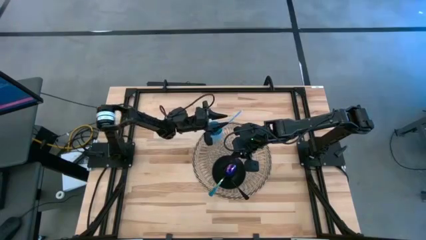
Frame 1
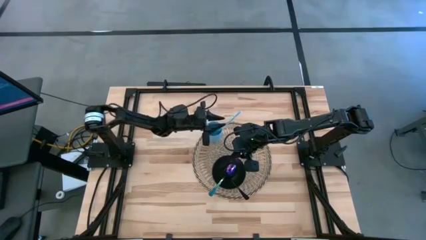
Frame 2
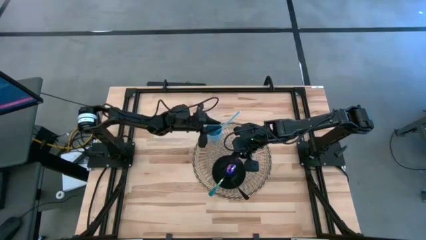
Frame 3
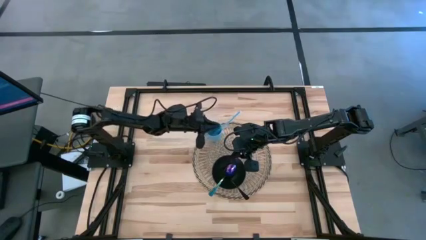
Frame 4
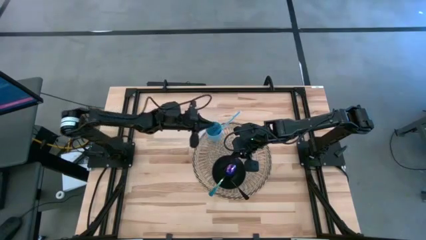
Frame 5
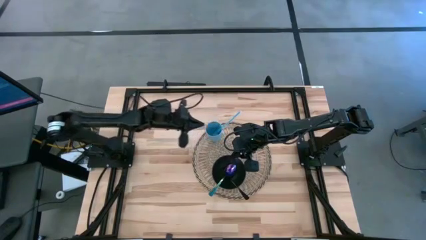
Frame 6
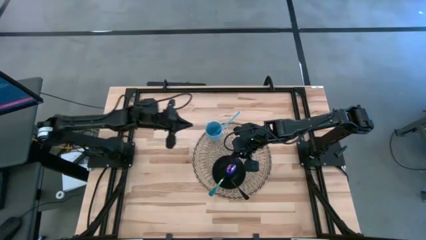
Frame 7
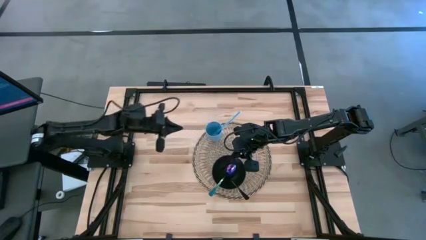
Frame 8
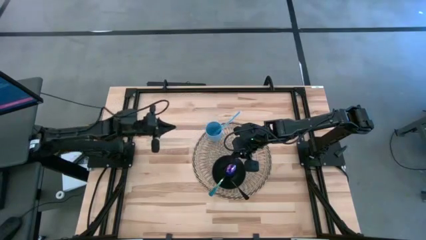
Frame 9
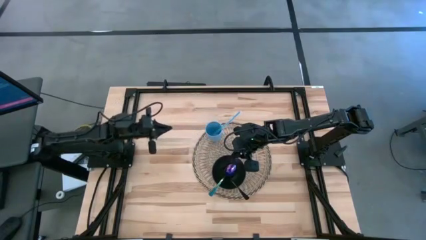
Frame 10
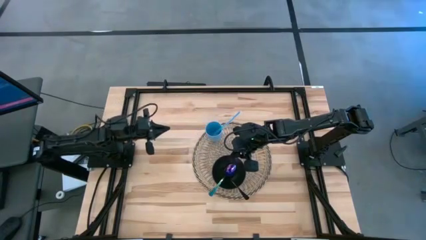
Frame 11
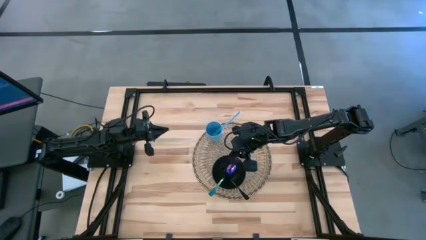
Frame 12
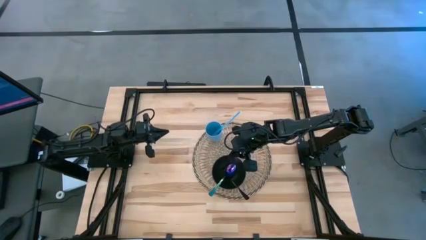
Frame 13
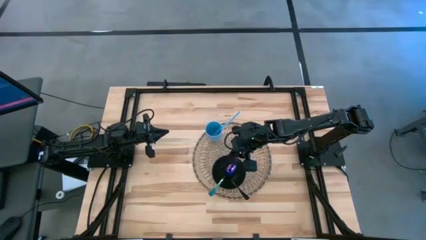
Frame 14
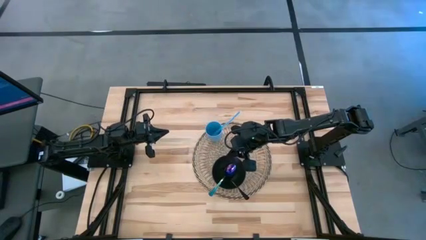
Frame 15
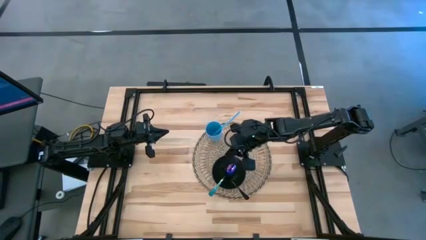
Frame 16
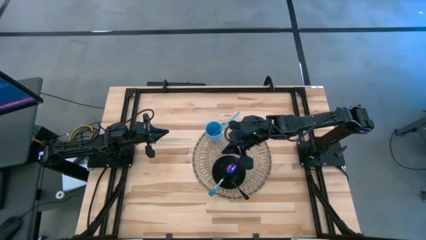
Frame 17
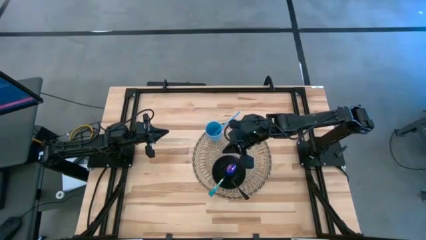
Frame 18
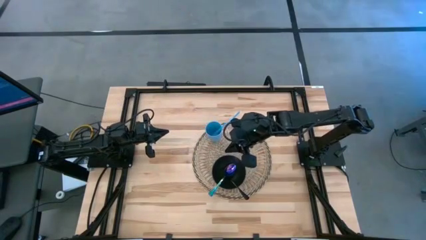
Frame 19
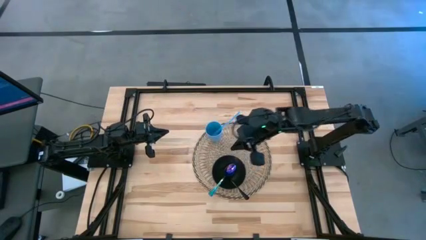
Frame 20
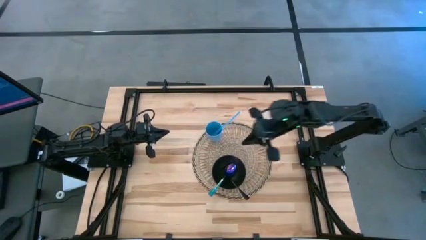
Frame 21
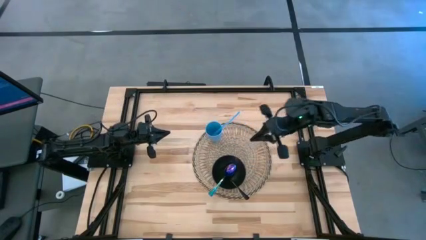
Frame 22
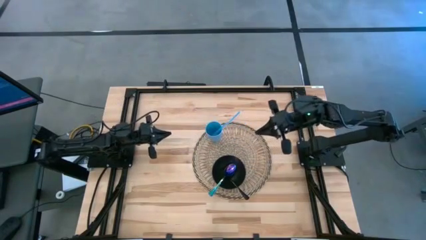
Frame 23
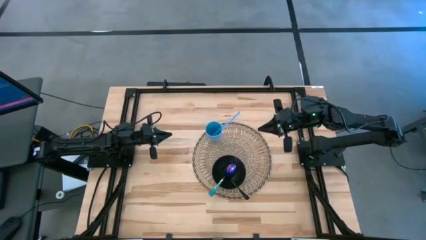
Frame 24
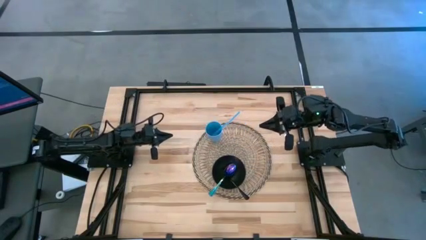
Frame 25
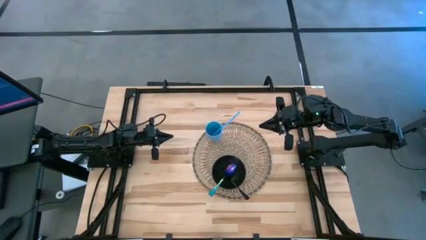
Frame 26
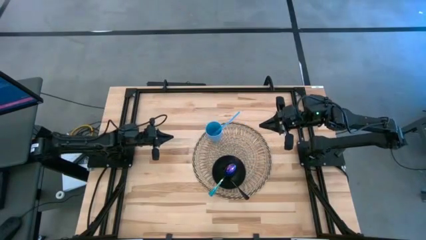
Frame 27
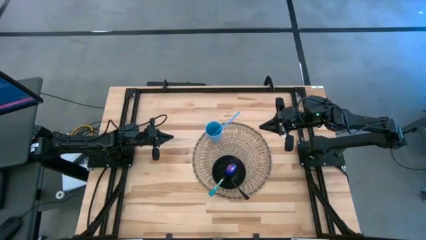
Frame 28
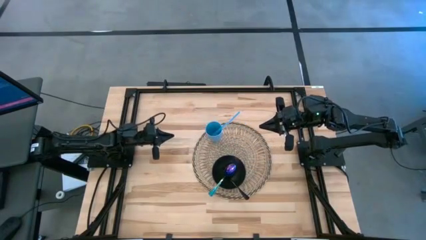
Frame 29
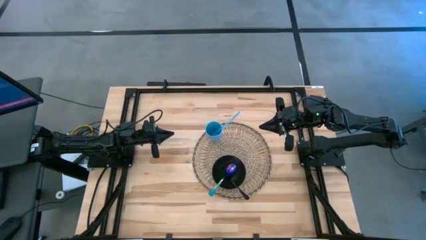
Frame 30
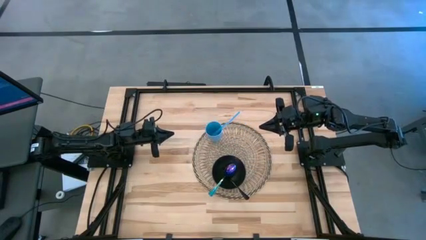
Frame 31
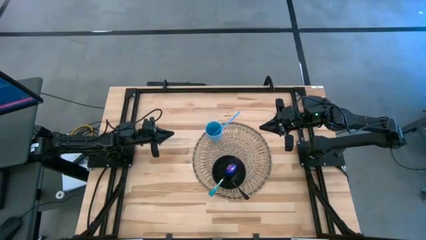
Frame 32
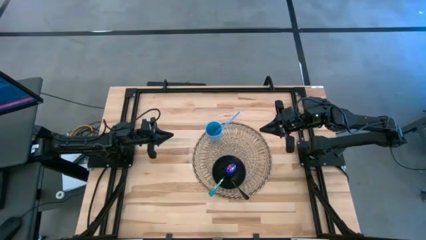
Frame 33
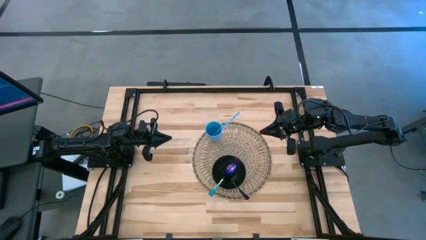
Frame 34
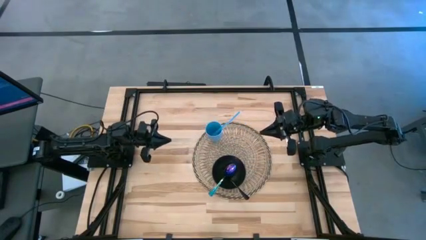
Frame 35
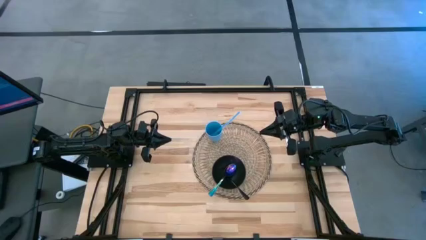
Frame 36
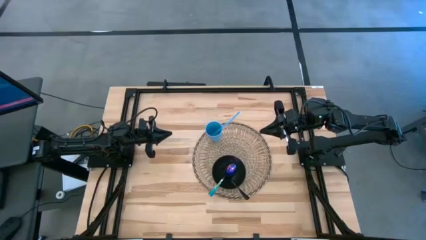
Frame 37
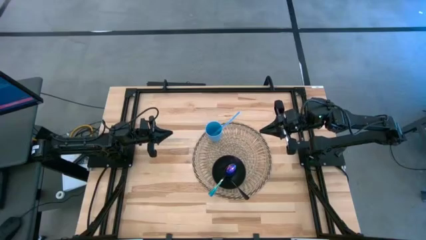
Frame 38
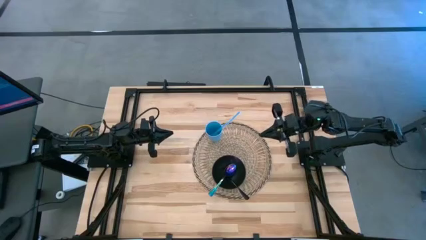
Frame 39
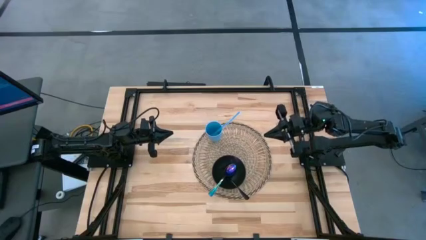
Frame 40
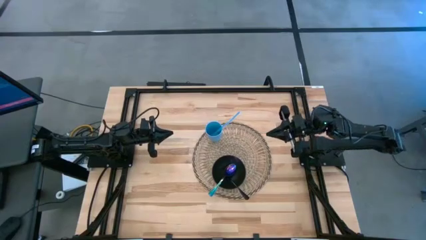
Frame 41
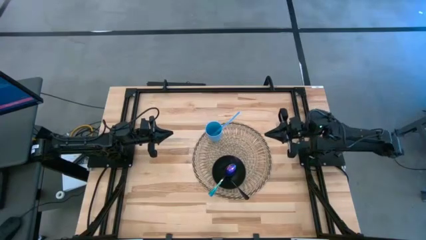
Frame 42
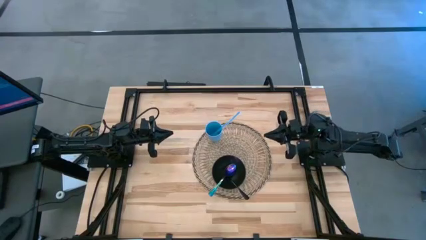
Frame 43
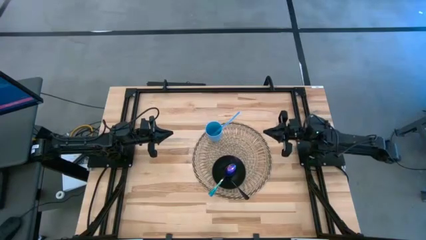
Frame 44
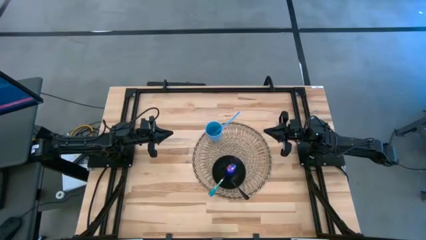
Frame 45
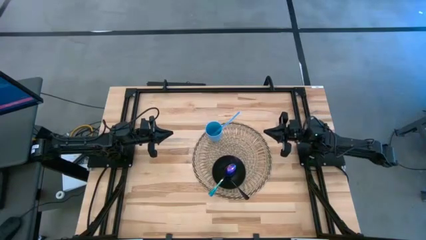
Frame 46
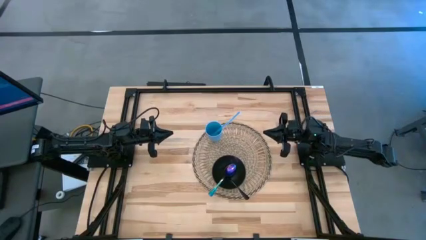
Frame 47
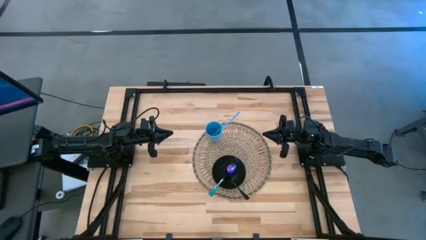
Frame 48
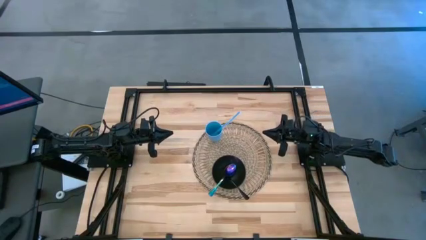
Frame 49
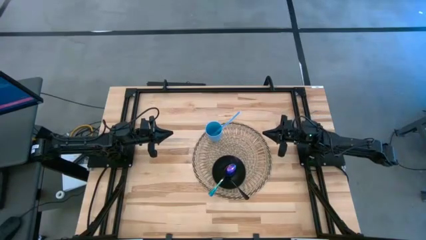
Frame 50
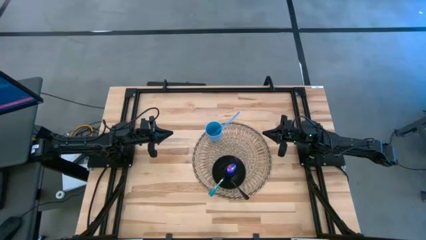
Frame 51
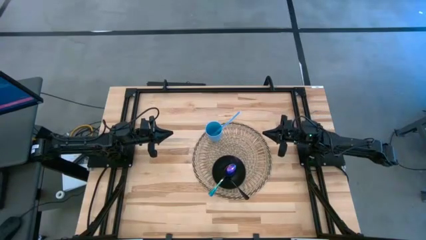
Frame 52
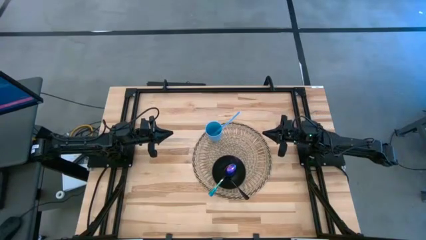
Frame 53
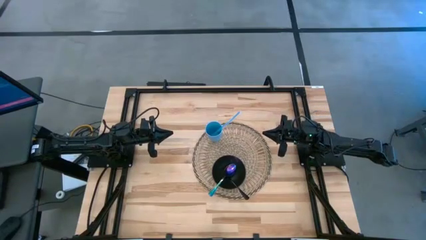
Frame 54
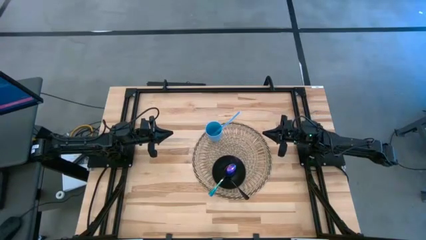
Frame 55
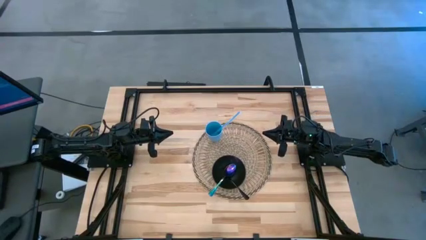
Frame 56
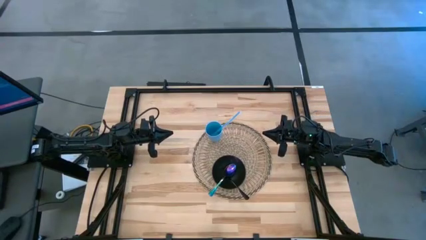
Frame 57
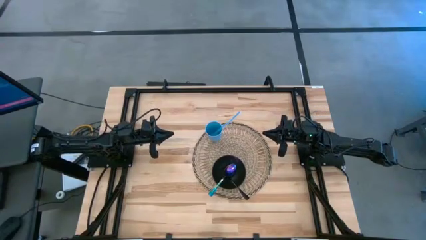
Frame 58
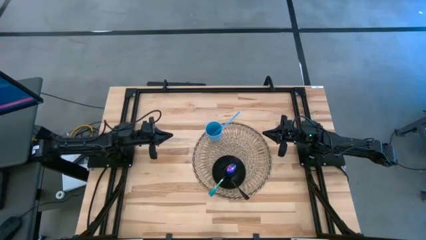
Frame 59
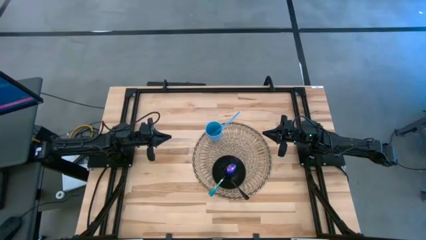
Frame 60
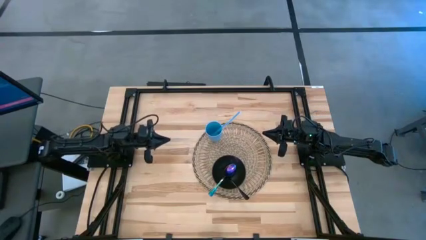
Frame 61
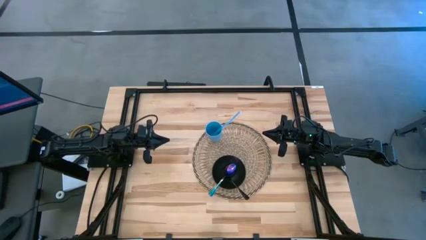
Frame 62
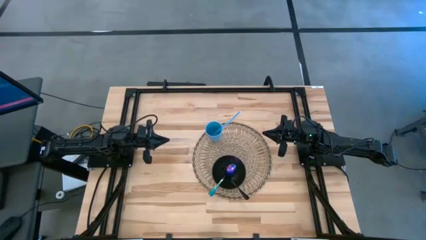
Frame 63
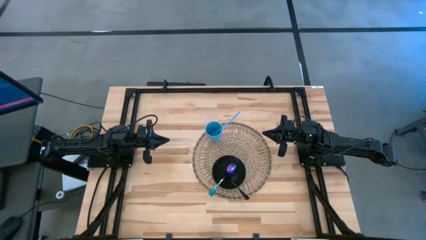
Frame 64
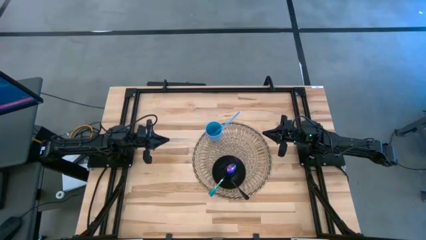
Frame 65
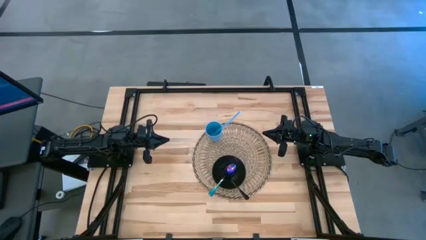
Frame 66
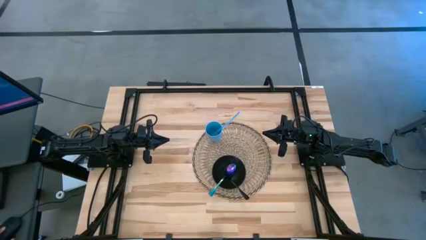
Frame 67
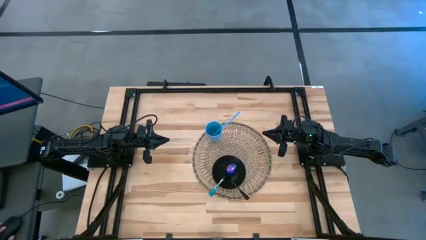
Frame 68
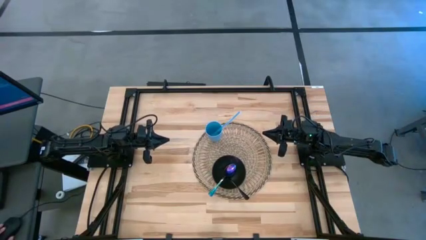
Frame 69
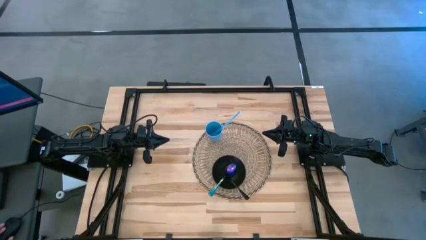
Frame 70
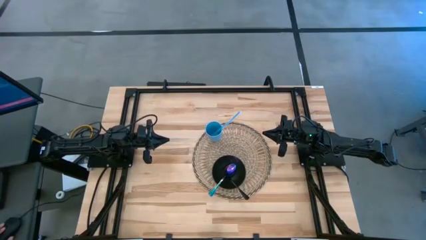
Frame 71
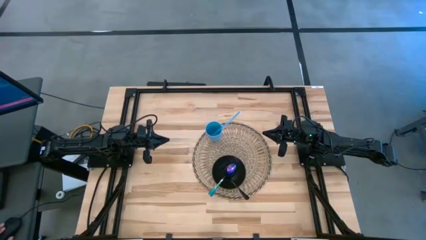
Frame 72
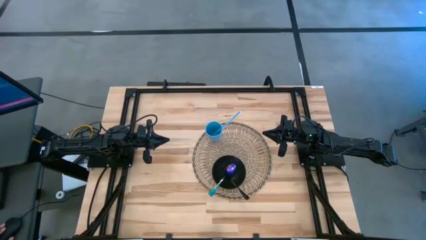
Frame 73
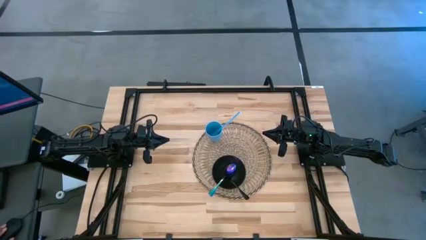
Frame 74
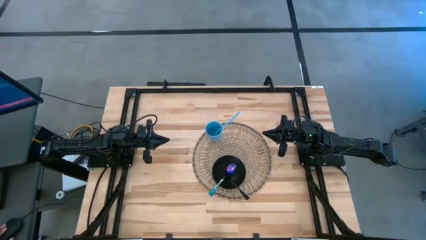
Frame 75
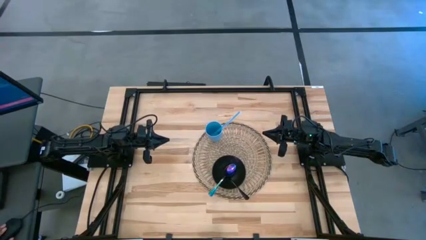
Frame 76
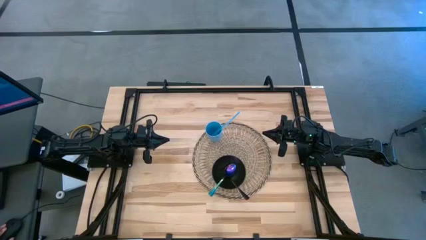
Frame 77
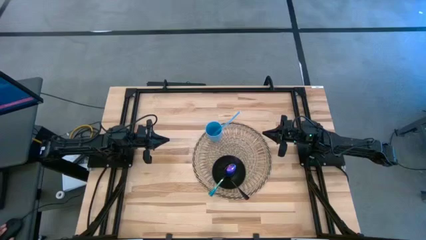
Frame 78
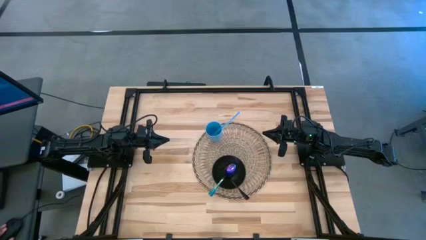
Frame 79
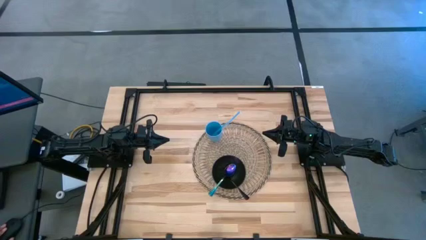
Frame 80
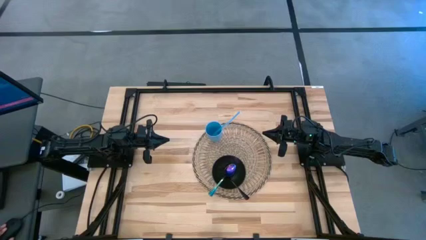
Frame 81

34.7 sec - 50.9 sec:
Task: Pick & Place Utensil
Return to Home Position
